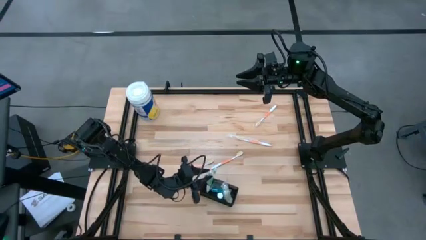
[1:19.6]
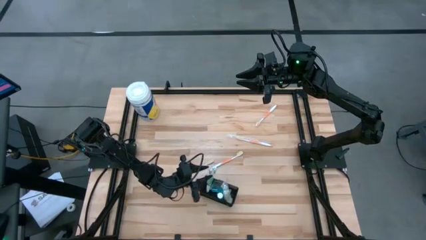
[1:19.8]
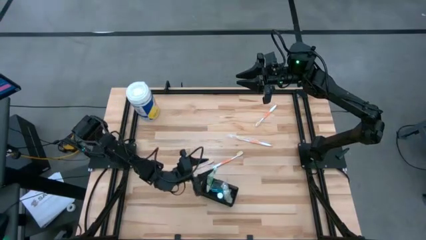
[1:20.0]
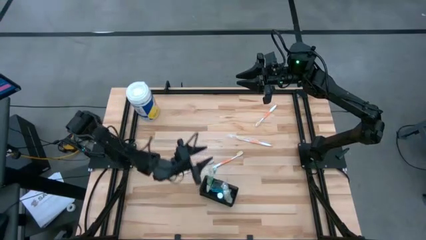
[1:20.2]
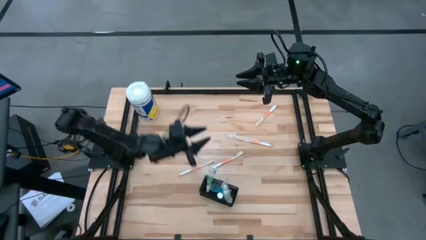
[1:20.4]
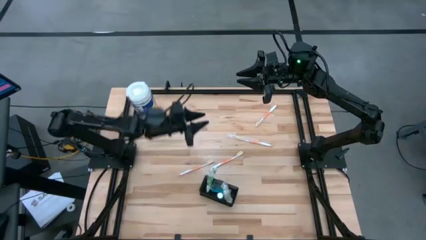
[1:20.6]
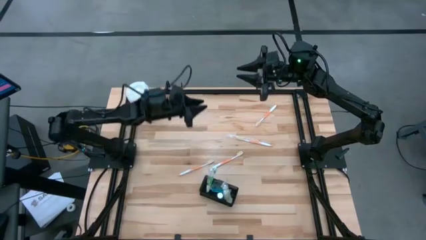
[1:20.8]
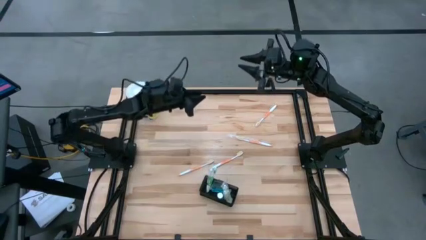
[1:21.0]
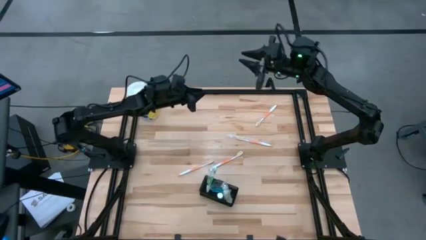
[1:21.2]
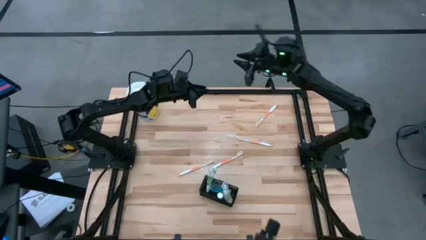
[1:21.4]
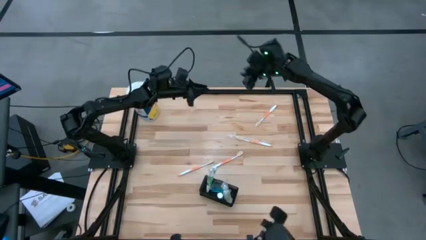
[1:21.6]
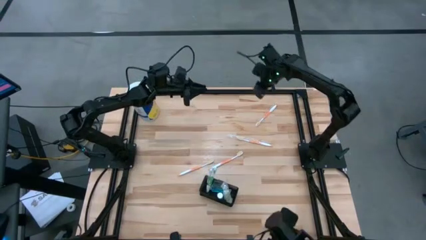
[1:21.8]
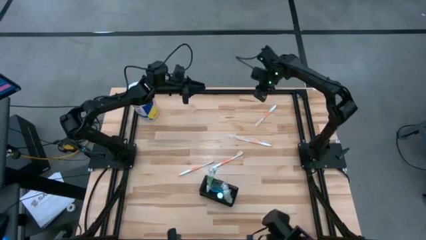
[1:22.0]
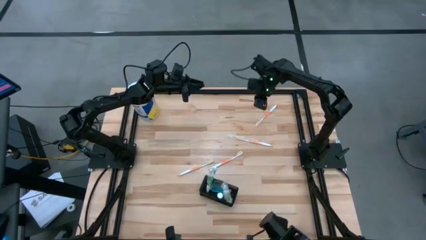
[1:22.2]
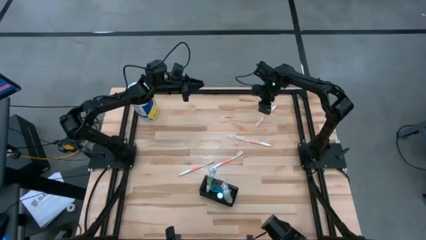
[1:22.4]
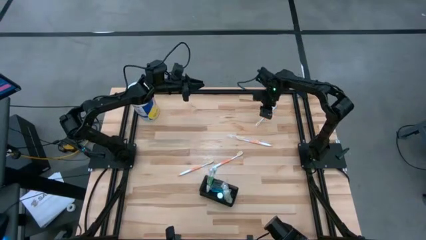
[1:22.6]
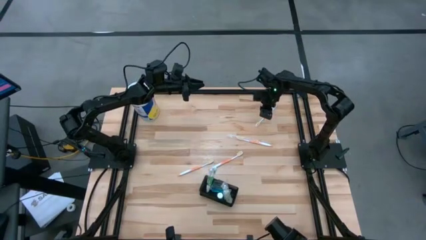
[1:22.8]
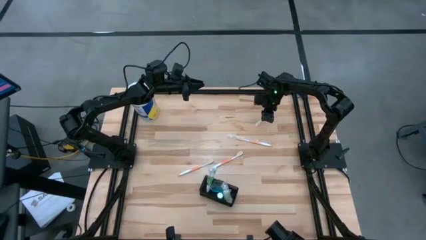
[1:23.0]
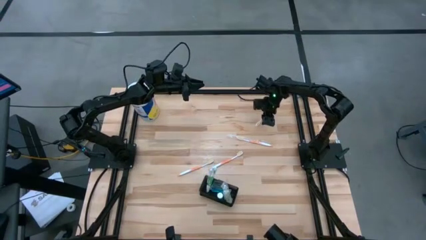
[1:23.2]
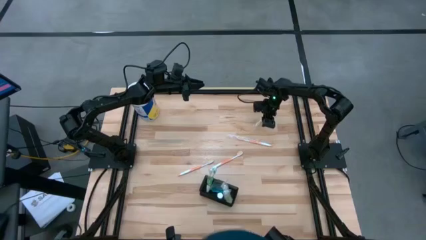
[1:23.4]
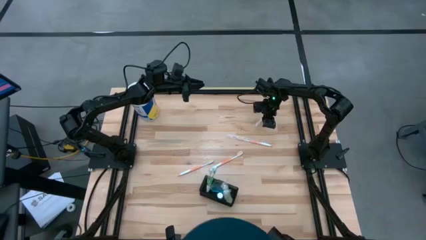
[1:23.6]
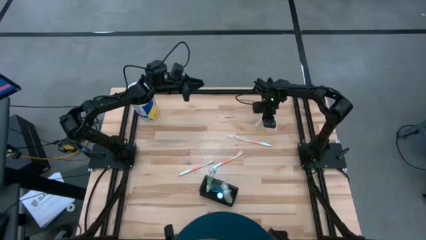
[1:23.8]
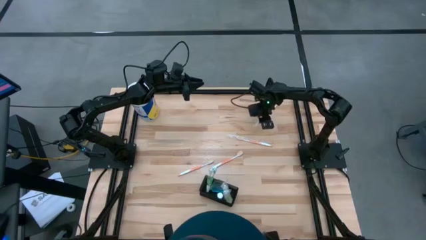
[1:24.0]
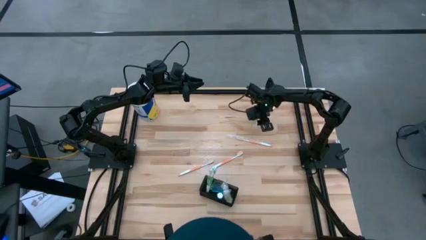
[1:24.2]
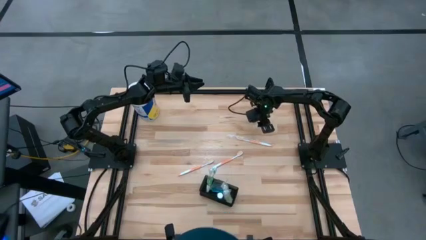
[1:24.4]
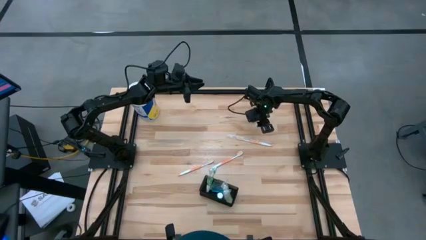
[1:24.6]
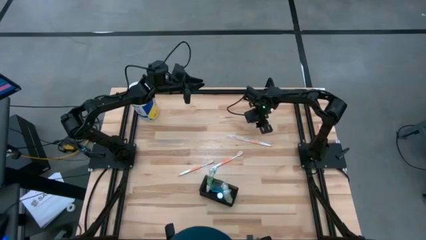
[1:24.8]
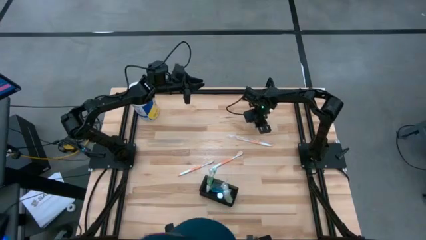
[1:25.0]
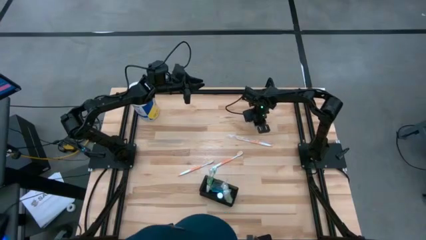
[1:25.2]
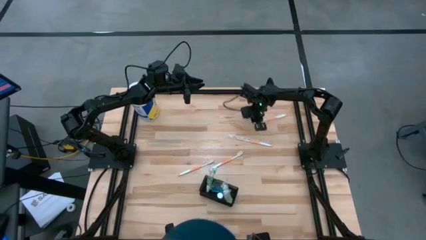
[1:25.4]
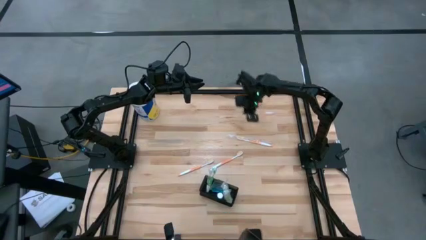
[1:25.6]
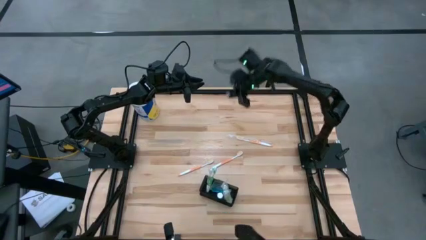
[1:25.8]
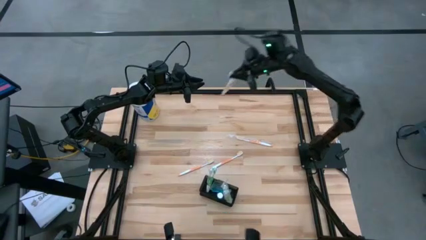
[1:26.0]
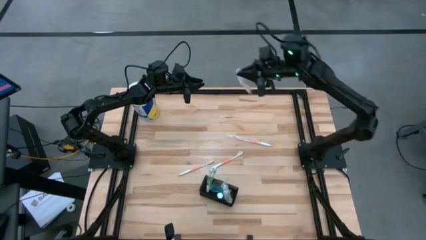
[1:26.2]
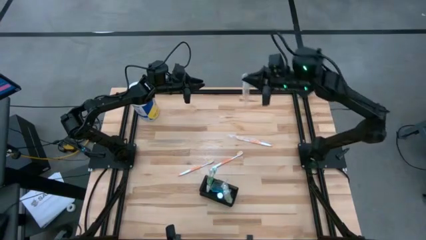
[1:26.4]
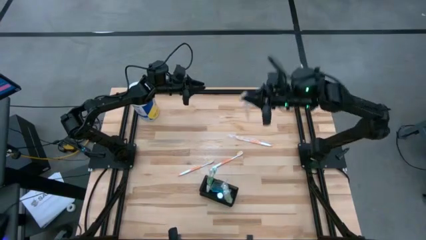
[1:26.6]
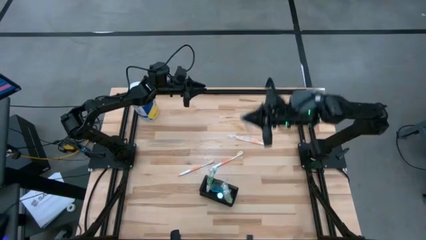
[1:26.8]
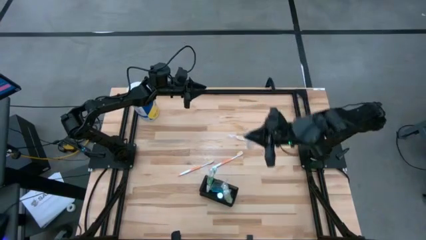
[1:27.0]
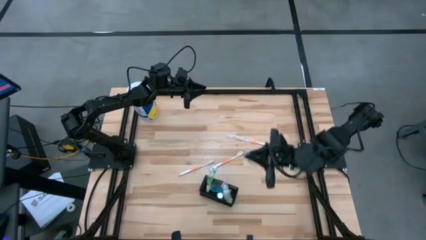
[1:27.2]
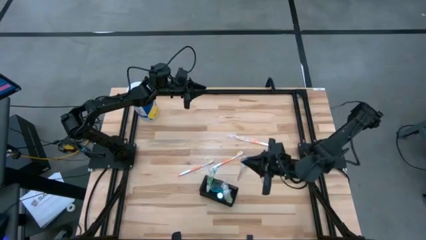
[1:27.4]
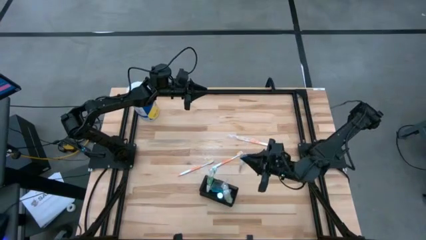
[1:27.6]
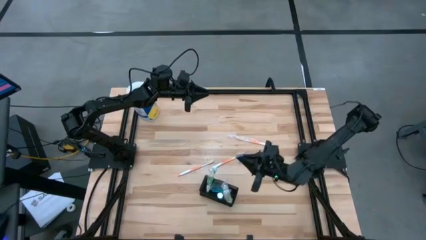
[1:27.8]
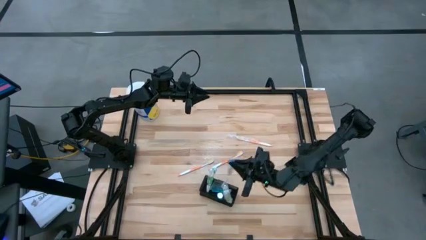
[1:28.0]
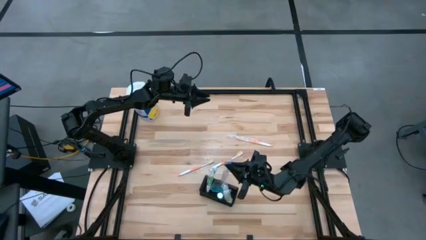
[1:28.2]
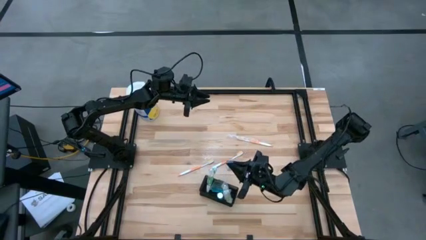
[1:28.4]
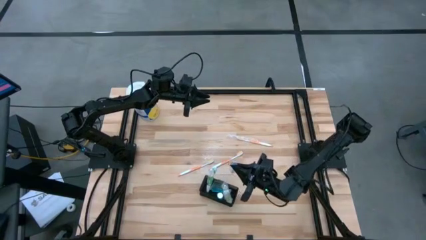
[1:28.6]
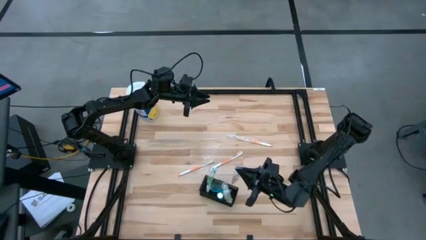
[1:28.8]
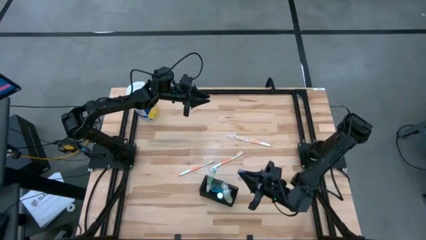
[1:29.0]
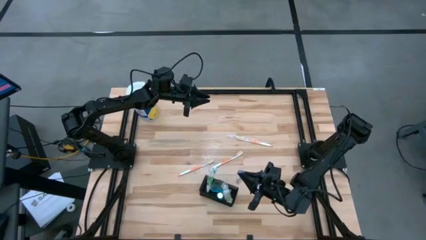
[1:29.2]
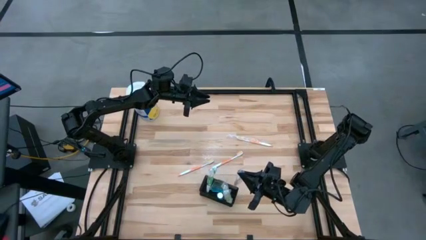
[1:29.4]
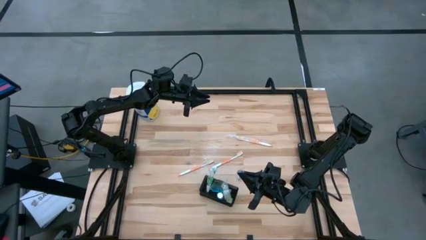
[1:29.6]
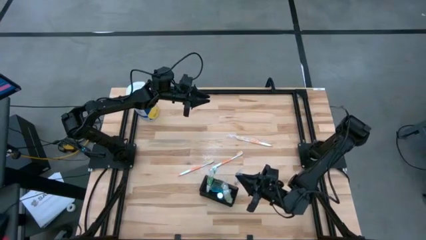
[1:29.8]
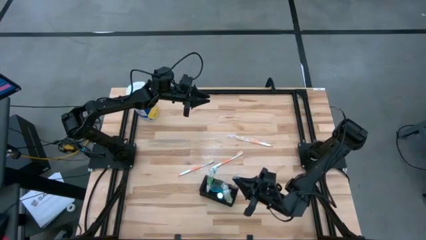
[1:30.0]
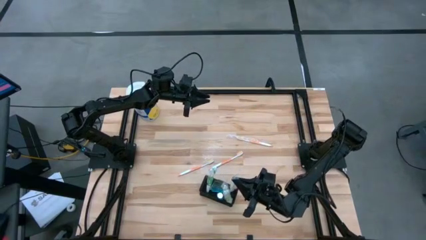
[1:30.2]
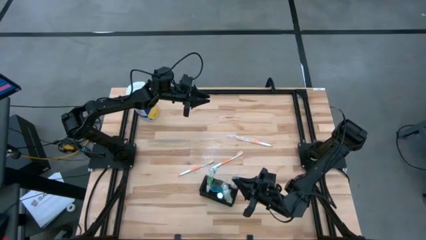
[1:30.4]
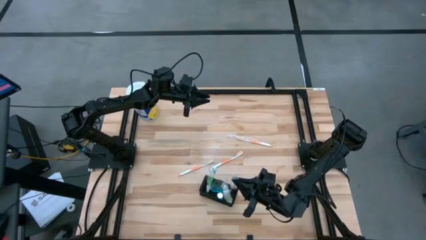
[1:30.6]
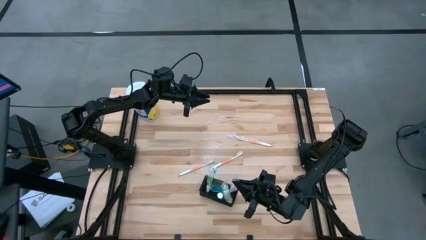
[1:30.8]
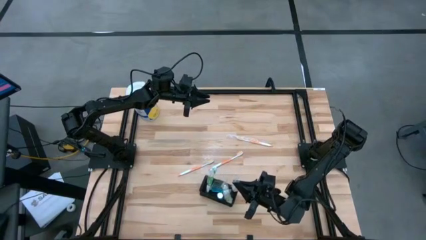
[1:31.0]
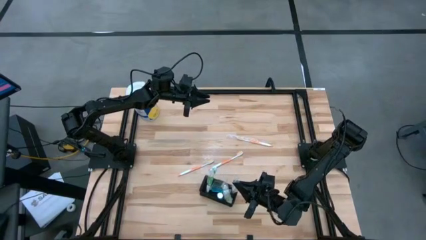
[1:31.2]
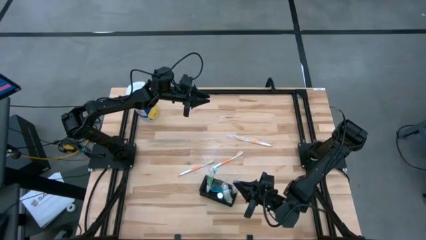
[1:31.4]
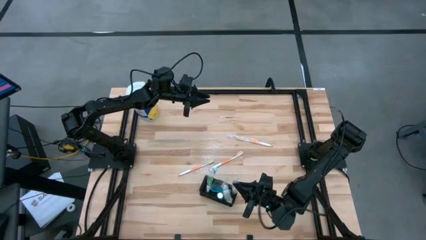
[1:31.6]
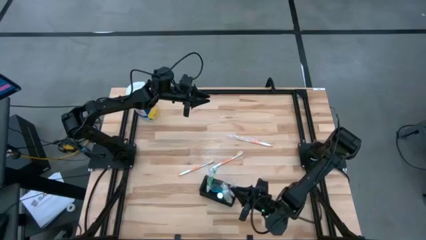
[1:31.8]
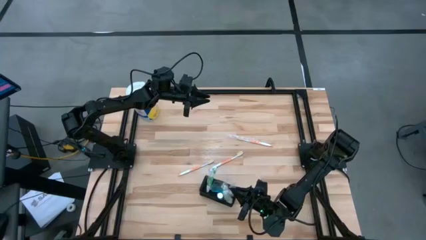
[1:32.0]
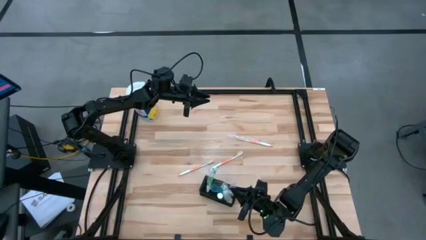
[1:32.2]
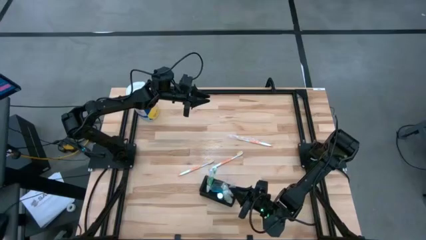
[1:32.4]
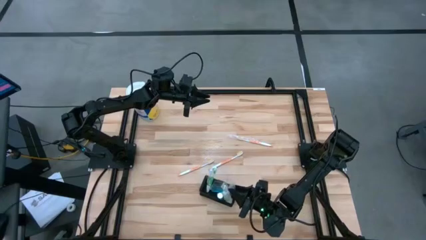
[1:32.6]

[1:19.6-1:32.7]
Task: Pick & Place toothbrushing station
Put the orange toothbrush into the black wire organizer
